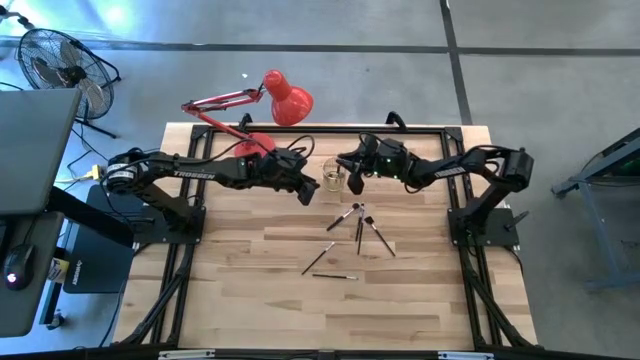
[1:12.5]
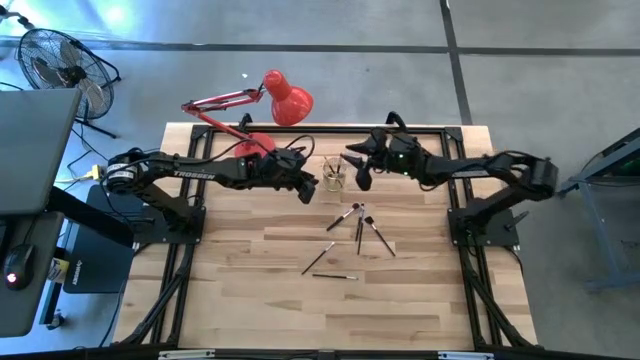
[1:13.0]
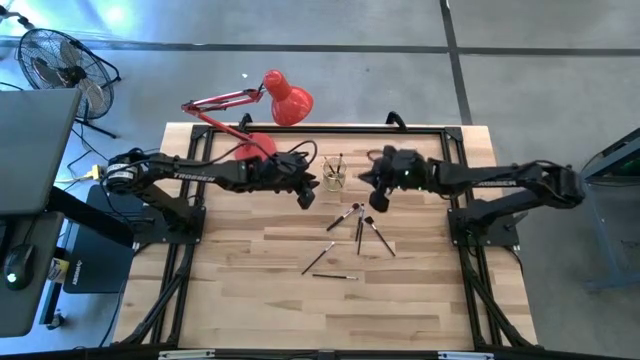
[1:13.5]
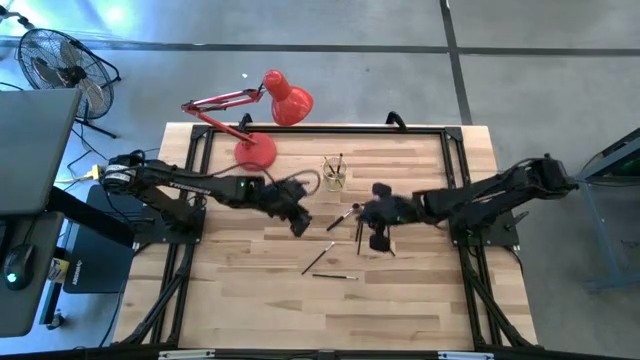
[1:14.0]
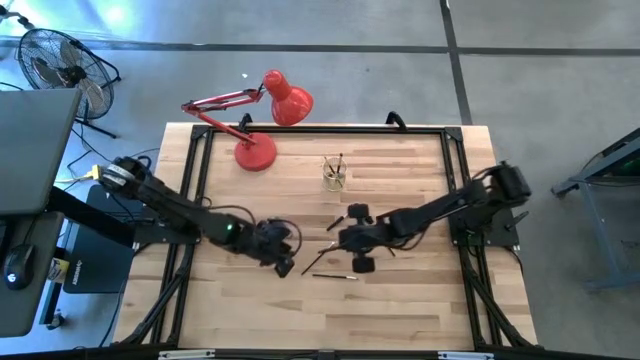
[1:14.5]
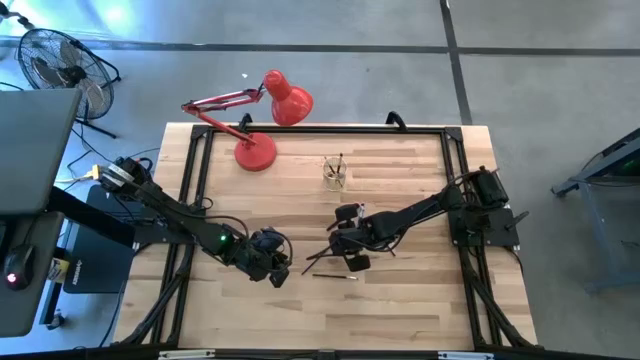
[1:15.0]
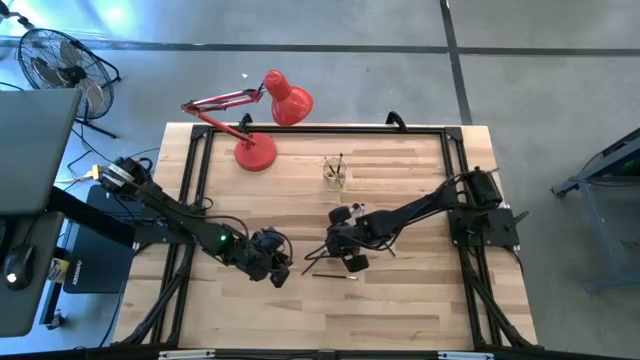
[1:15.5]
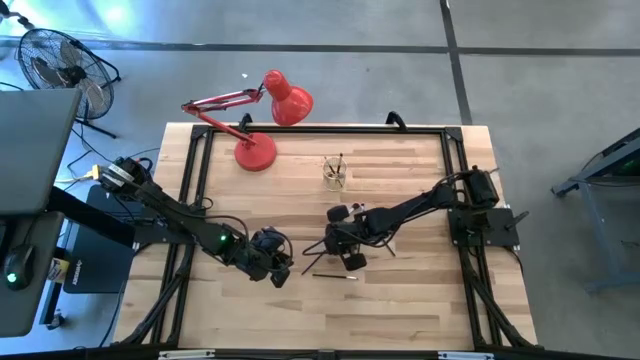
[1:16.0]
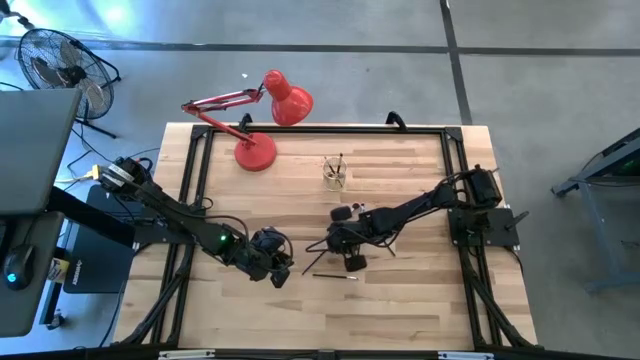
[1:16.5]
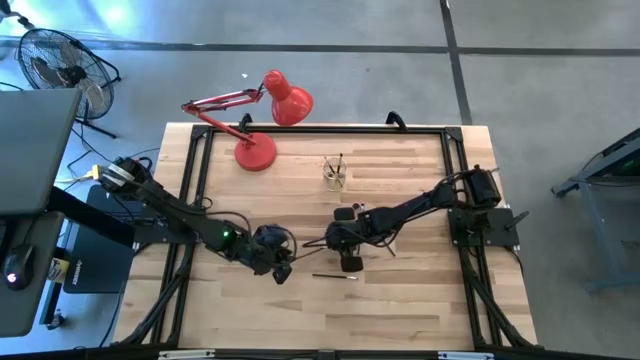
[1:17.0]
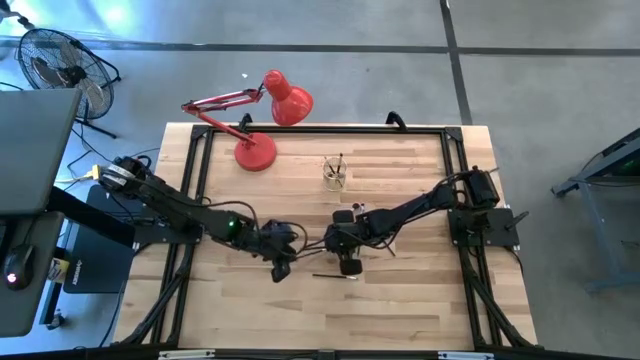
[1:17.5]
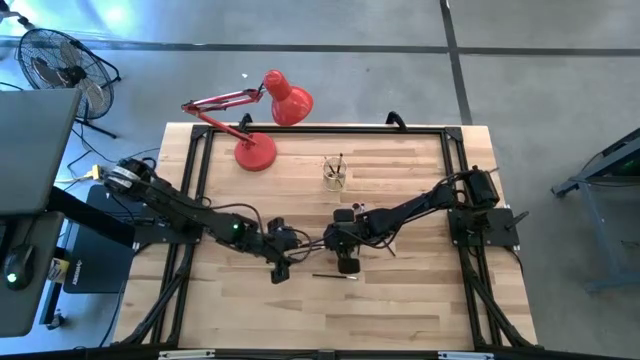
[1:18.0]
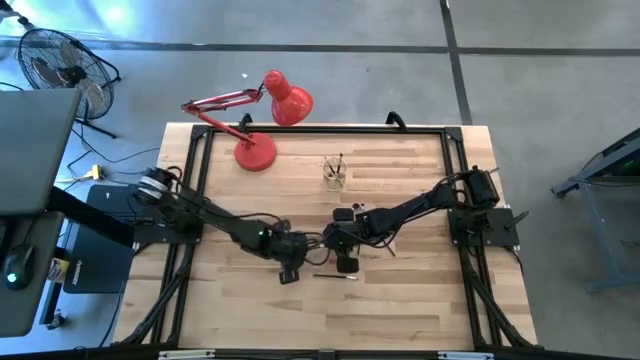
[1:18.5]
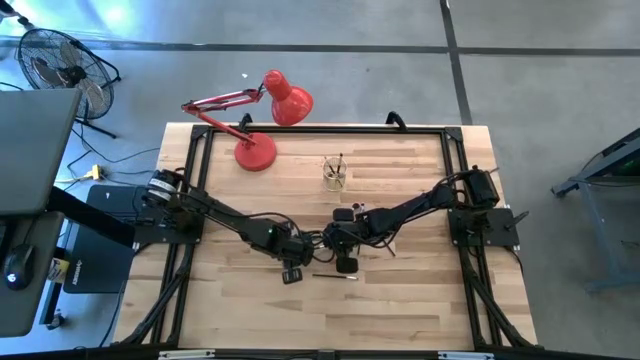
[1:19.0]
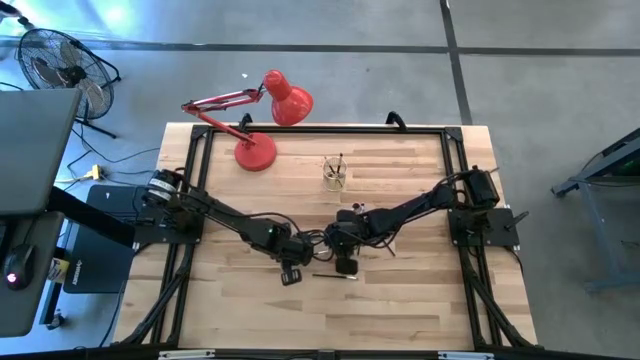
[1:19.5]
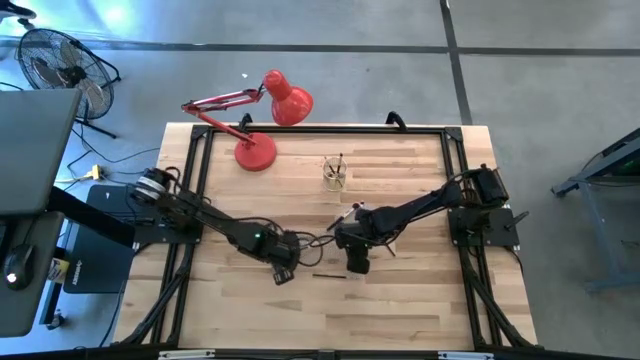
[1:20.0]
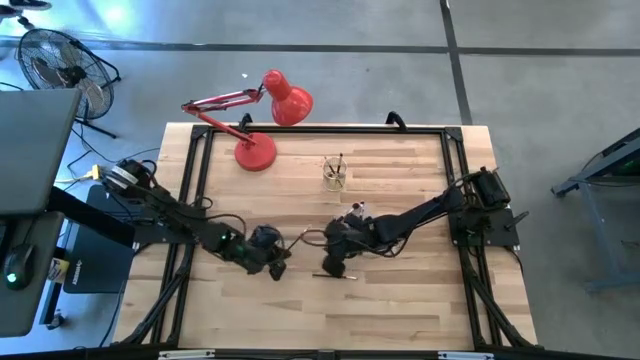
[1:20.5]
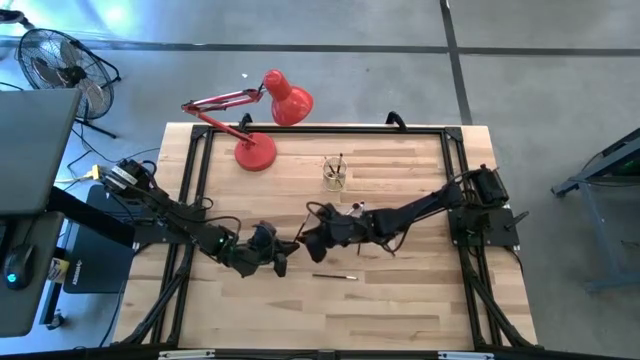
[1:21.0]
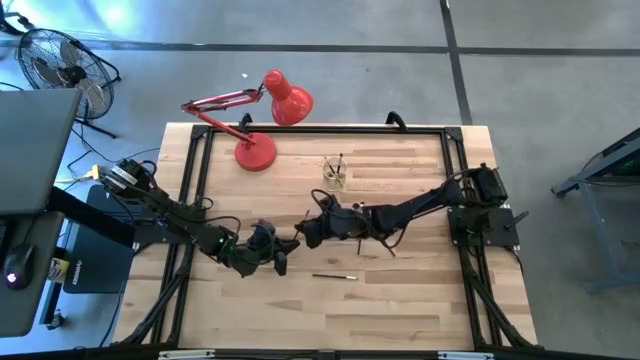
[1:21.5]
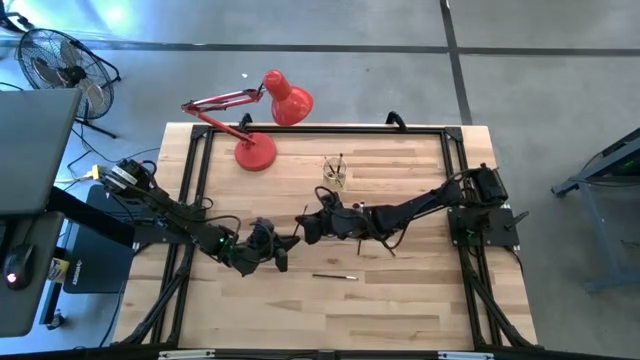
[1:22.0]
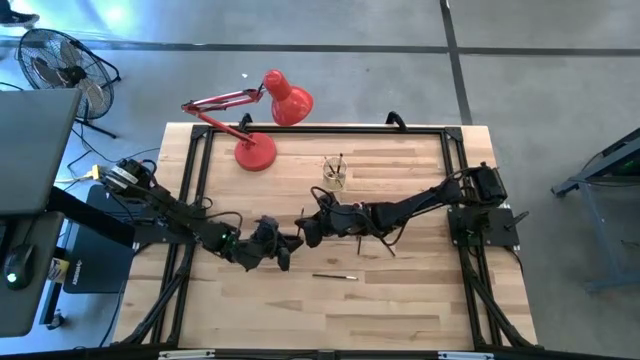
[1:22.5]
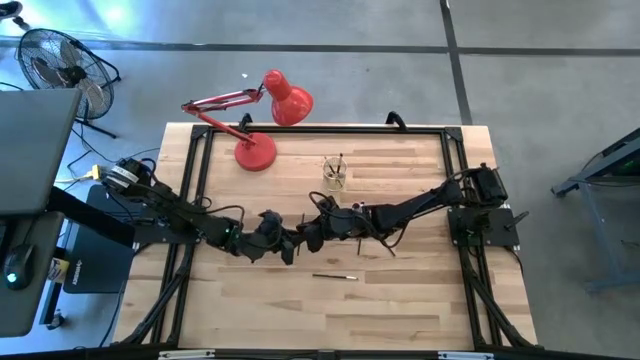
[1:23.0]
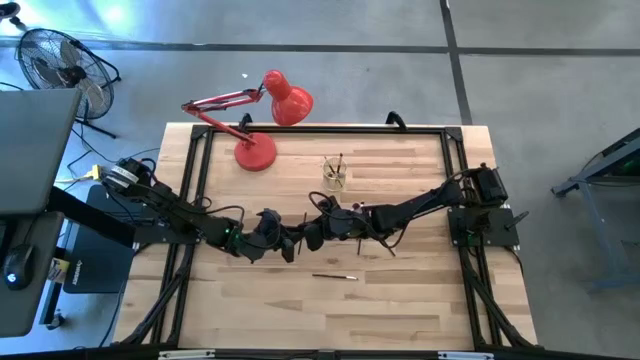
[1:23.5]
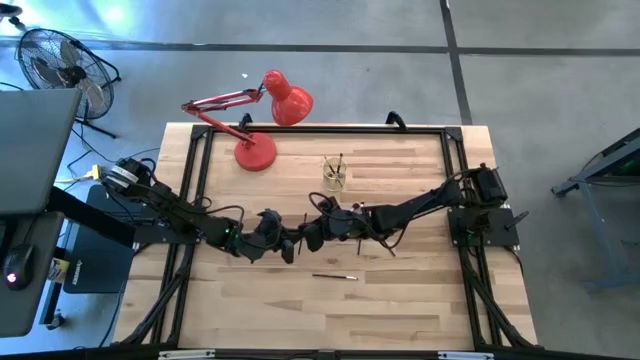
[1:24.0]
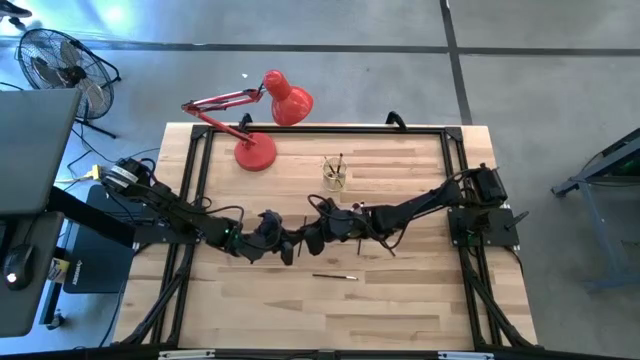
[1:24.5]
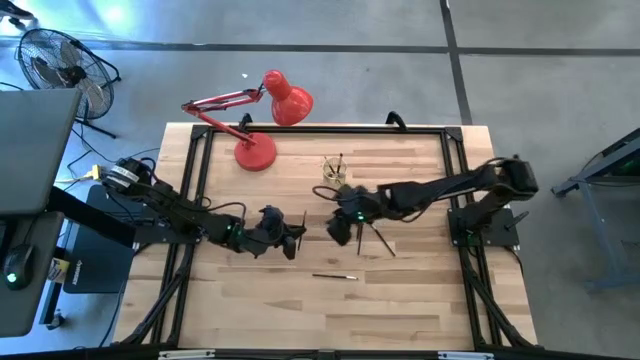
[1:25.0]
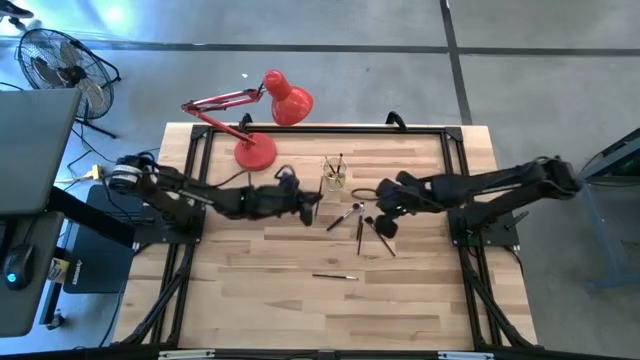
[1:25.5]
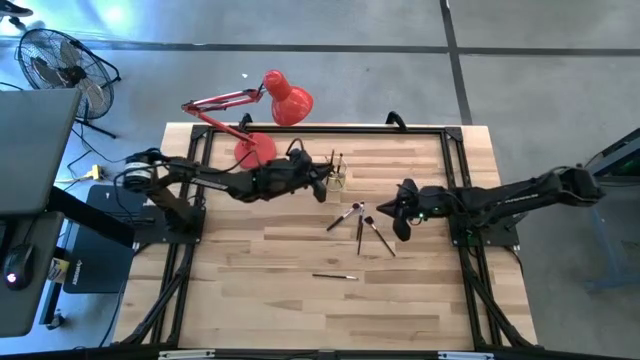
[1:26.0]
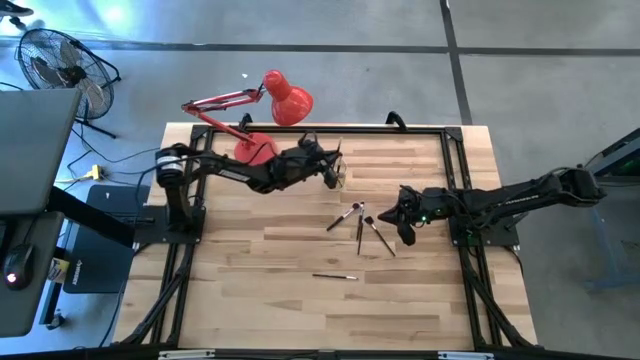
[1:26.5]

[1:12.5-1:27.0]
Task: Put items in baskets/containers
Put the paint brush into the wire bin

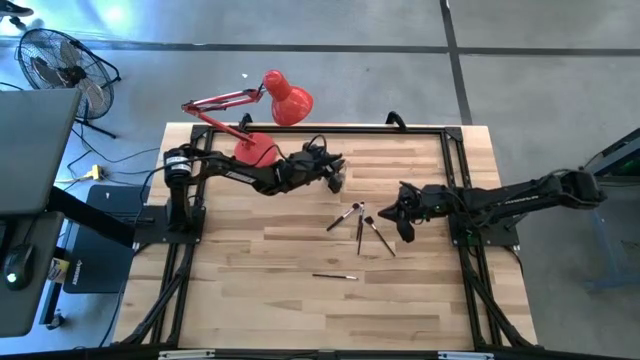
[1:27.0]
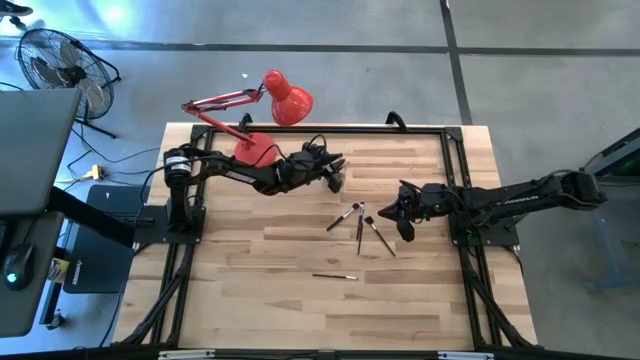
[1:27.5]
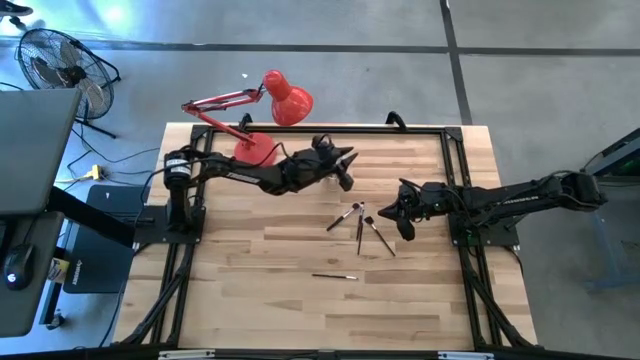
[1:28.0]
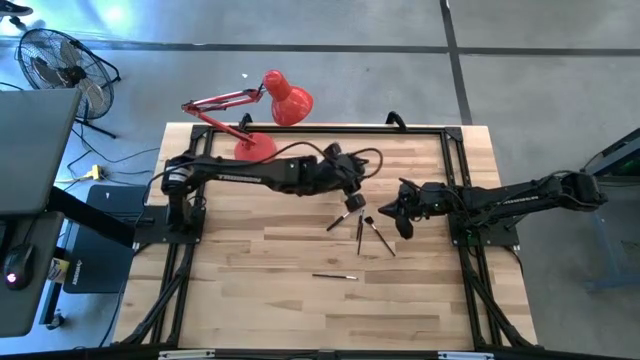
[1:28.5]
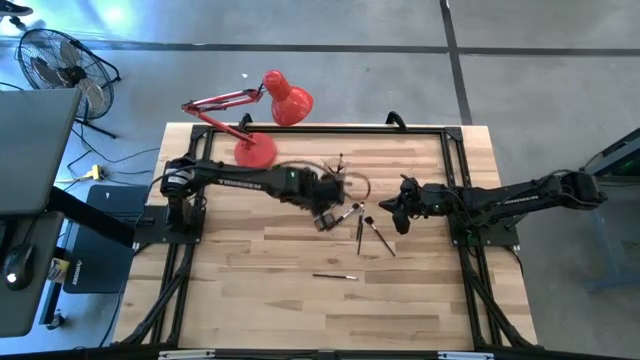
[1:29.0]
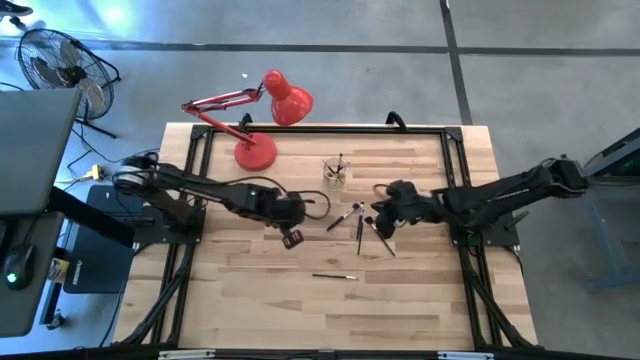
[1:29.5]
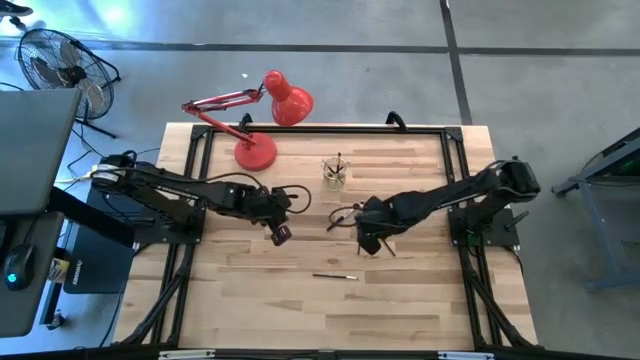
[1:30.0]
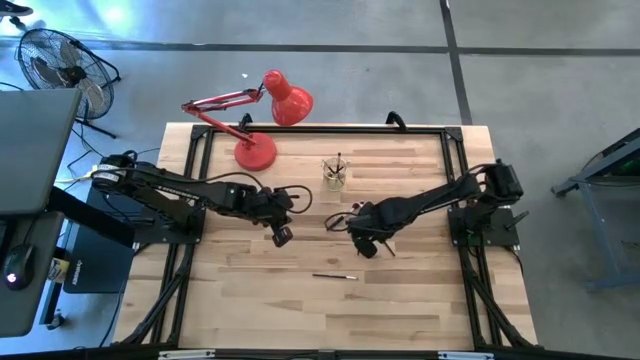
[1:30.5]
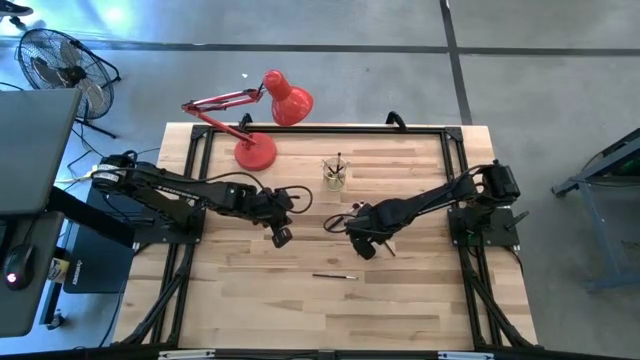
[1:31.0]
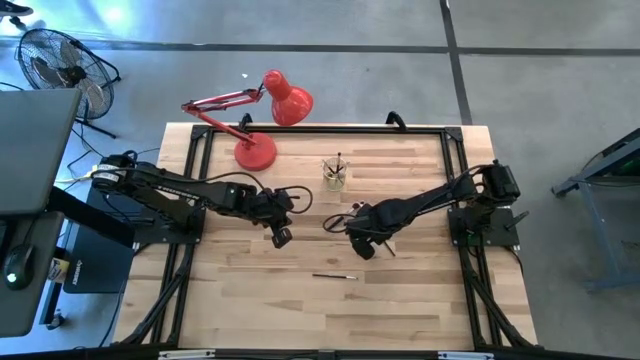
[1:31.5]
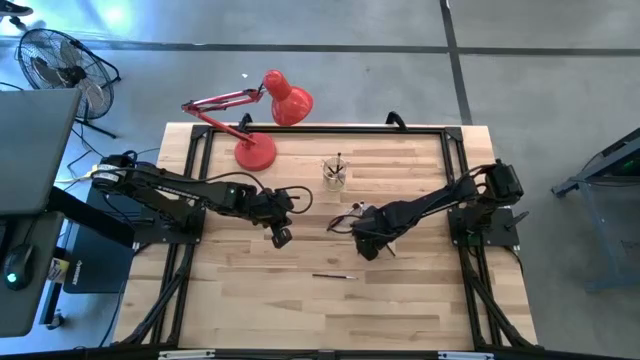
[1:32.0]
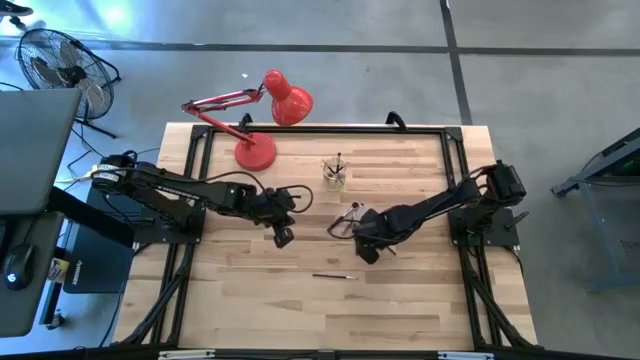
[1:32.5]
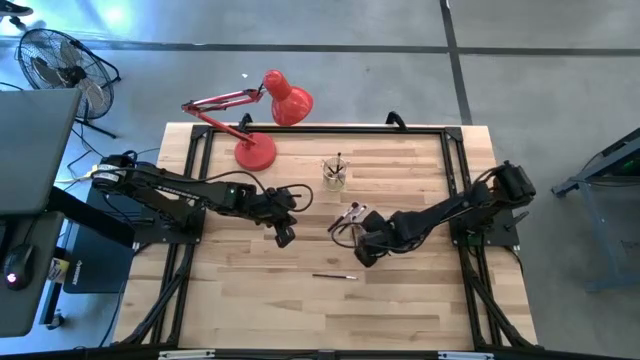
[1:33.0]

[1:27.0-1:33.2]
Put the makeup brush into the wire bin
